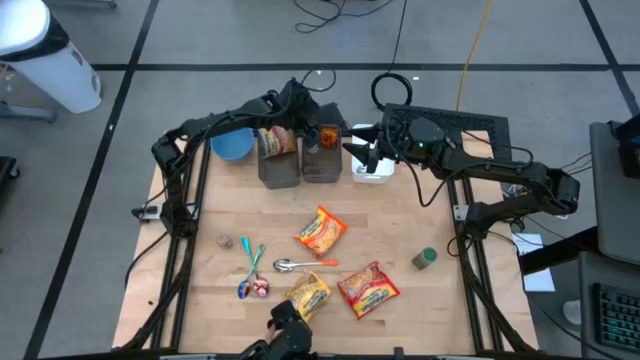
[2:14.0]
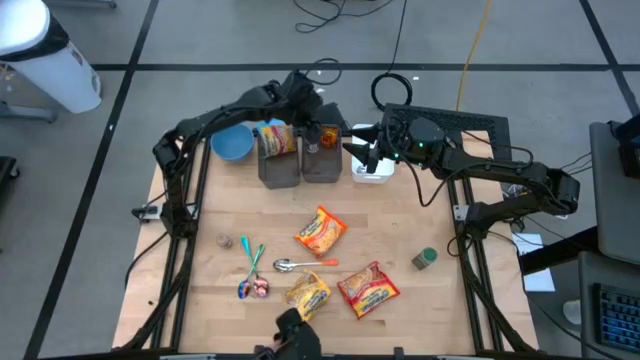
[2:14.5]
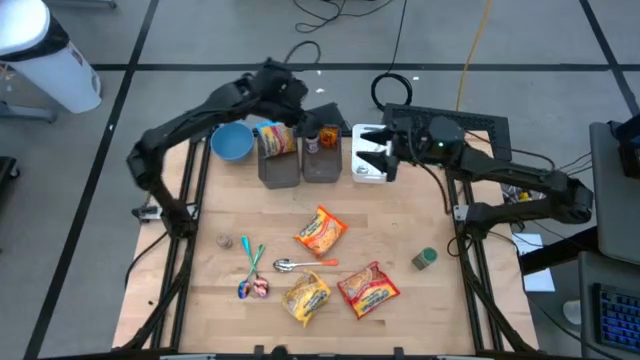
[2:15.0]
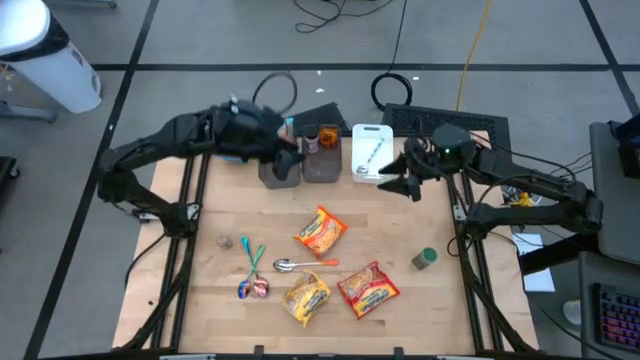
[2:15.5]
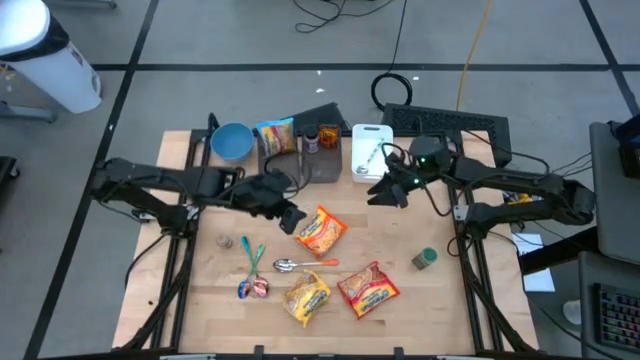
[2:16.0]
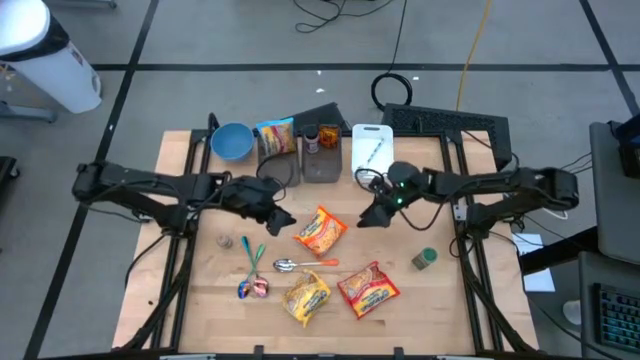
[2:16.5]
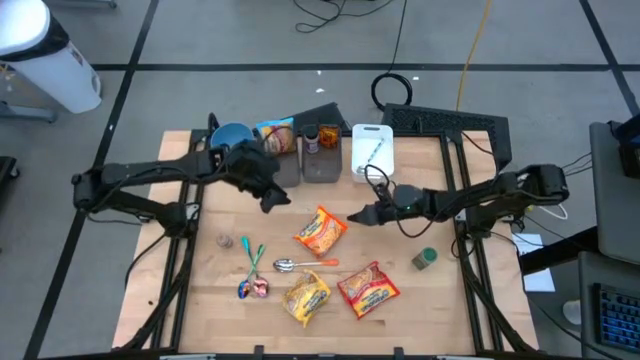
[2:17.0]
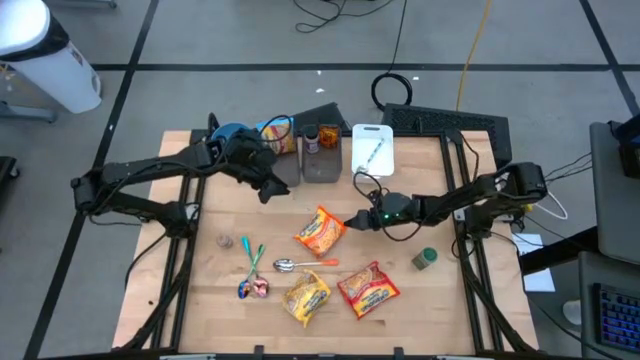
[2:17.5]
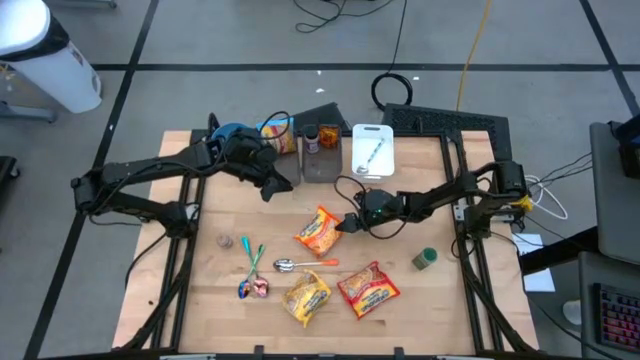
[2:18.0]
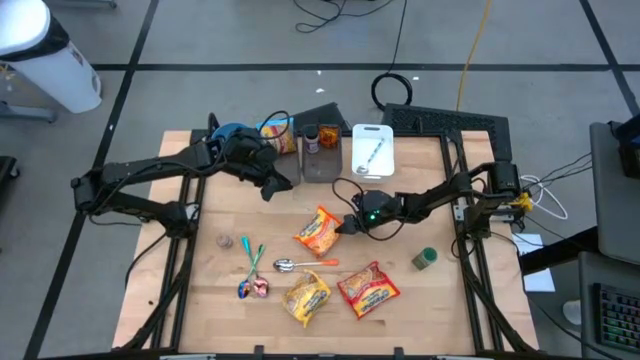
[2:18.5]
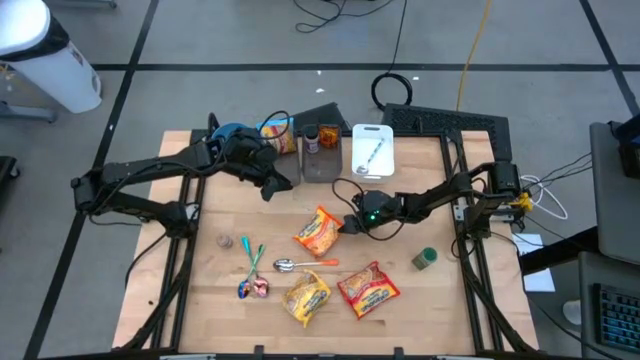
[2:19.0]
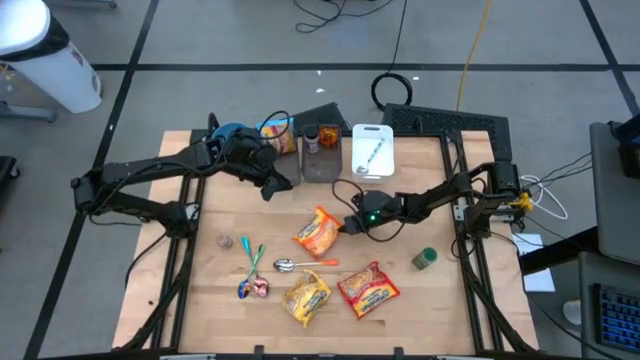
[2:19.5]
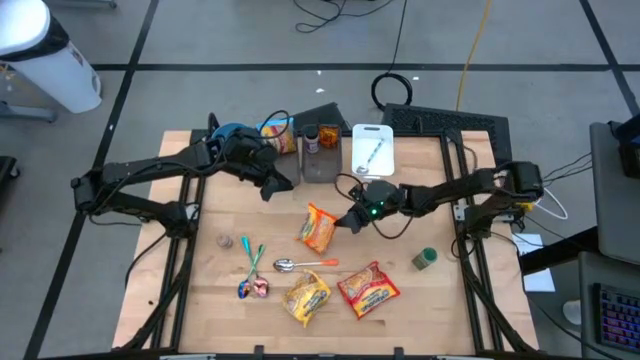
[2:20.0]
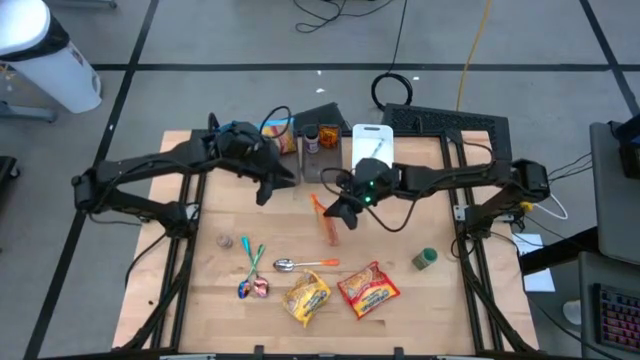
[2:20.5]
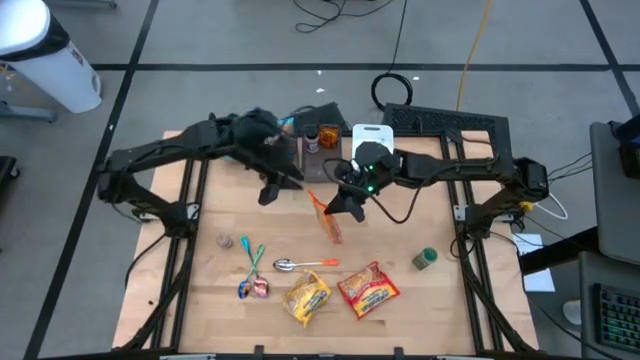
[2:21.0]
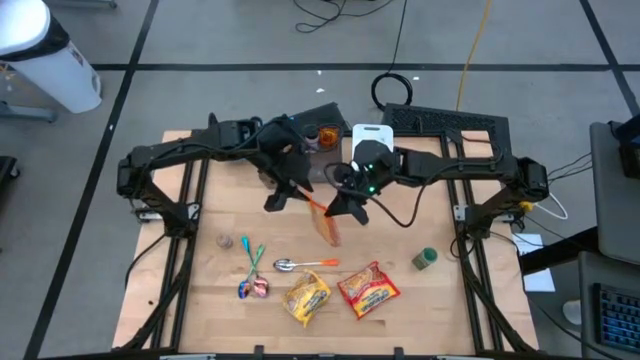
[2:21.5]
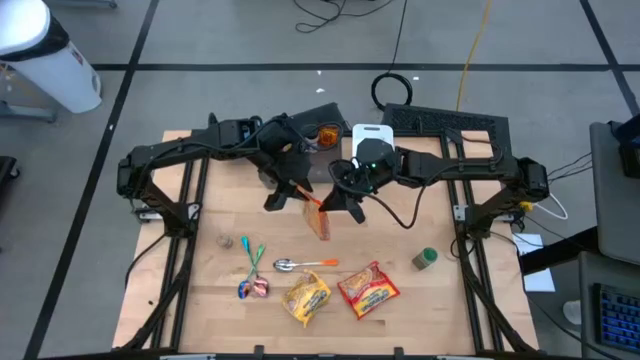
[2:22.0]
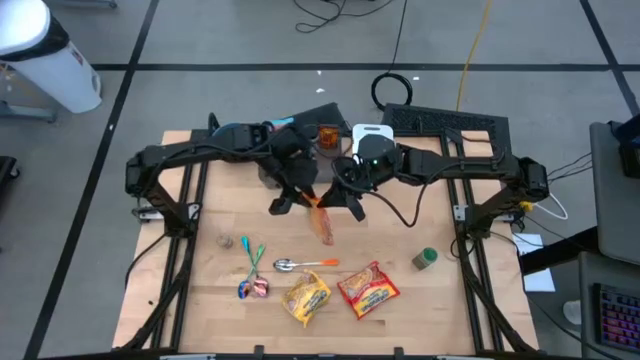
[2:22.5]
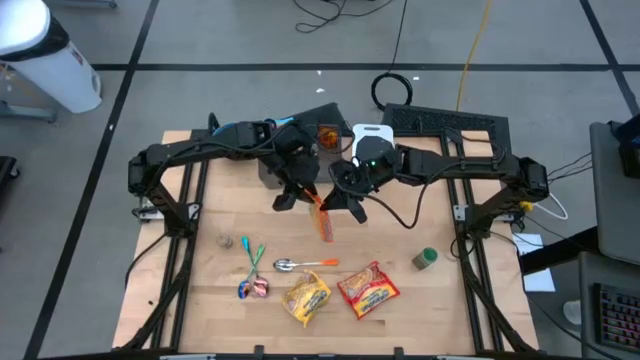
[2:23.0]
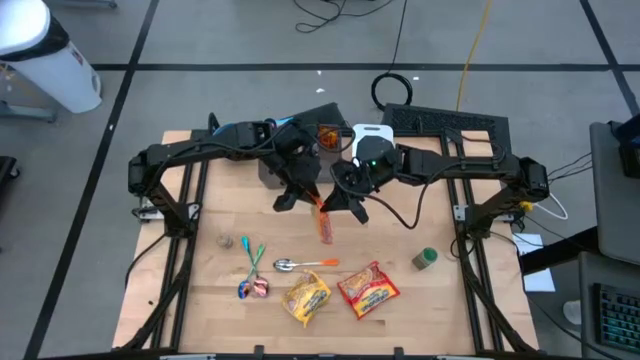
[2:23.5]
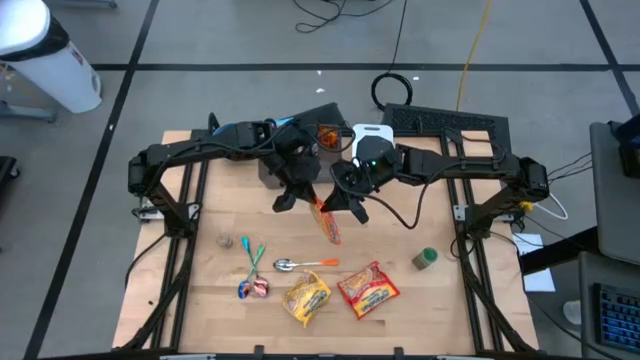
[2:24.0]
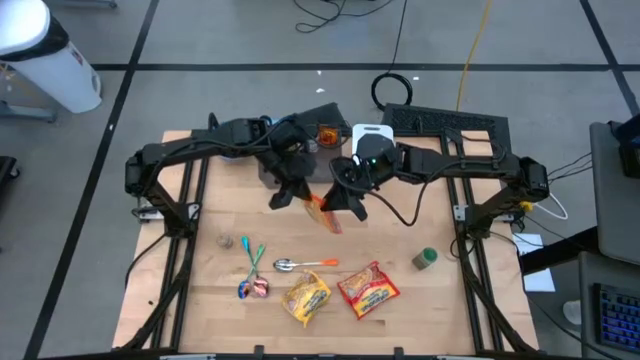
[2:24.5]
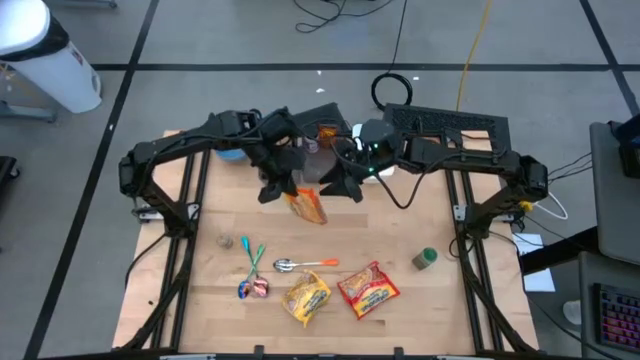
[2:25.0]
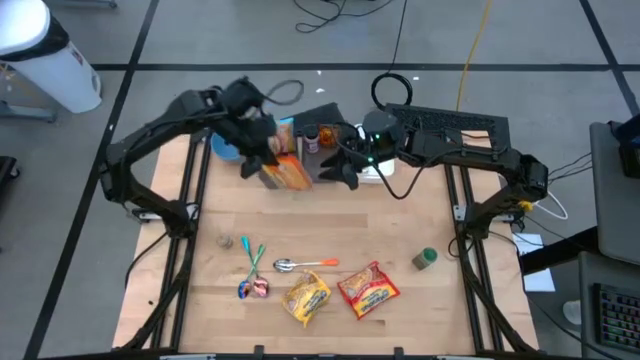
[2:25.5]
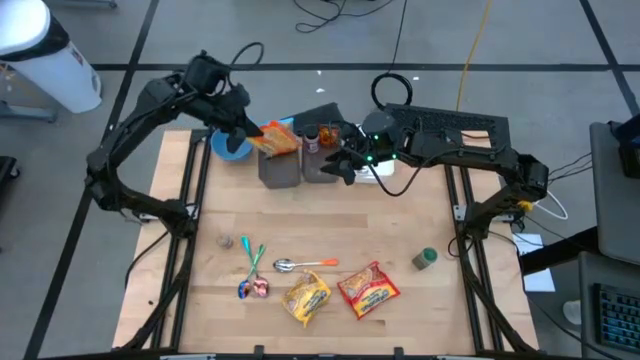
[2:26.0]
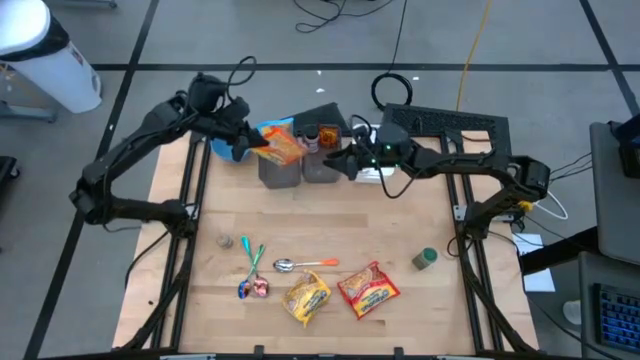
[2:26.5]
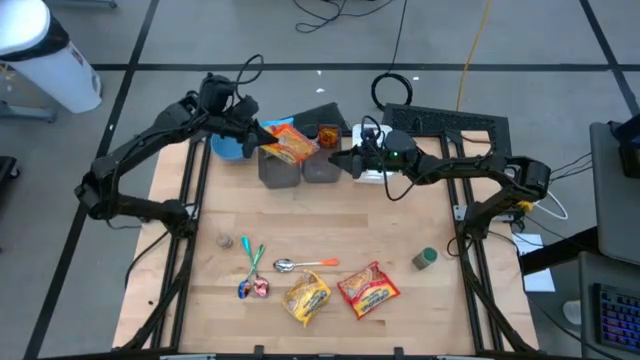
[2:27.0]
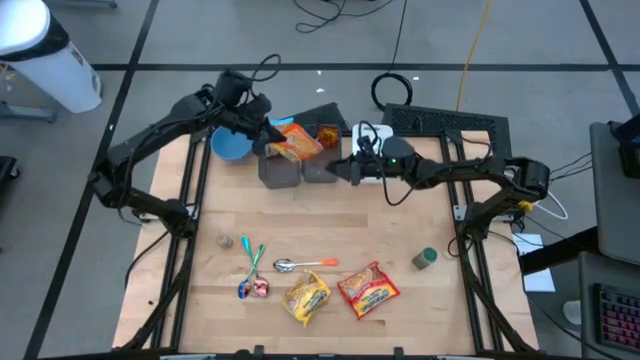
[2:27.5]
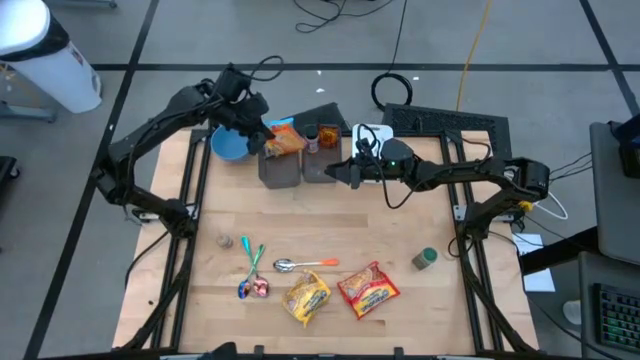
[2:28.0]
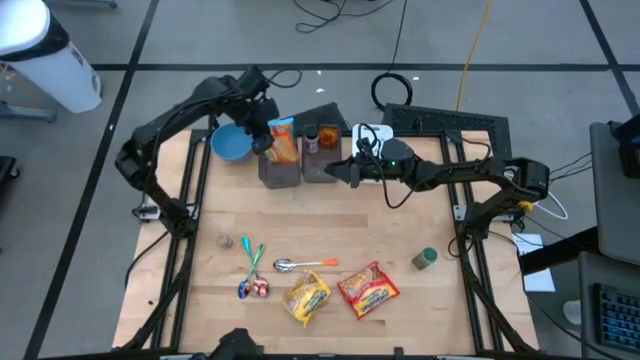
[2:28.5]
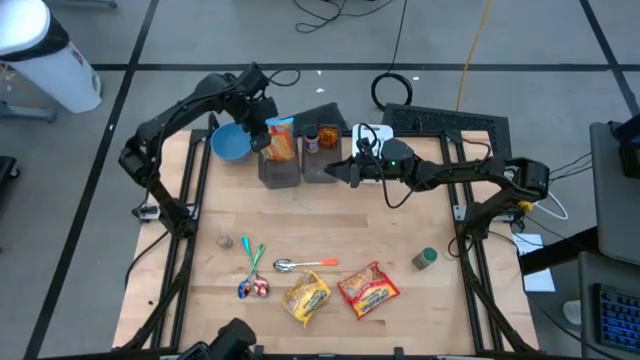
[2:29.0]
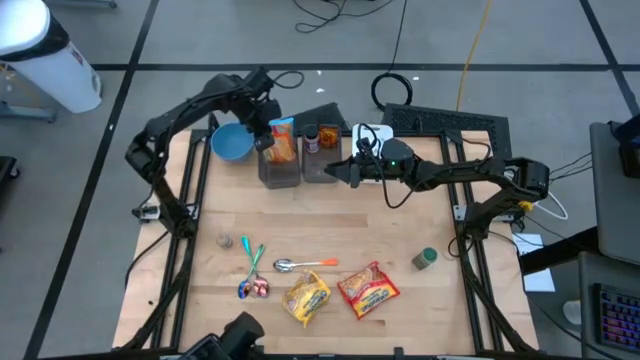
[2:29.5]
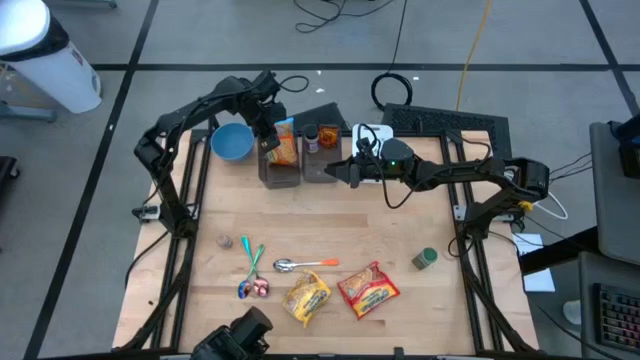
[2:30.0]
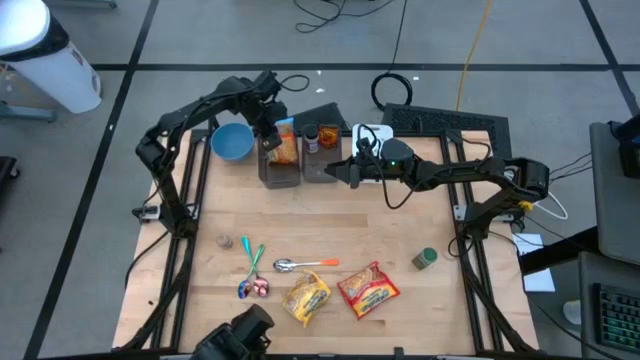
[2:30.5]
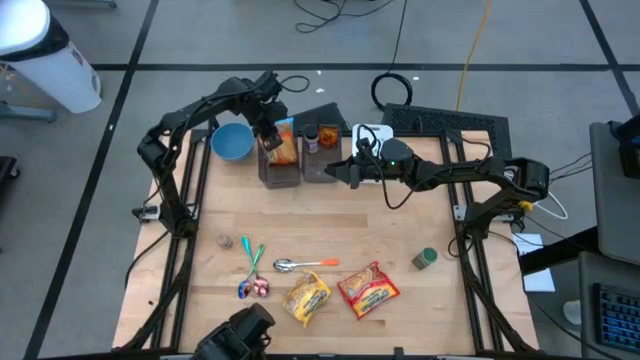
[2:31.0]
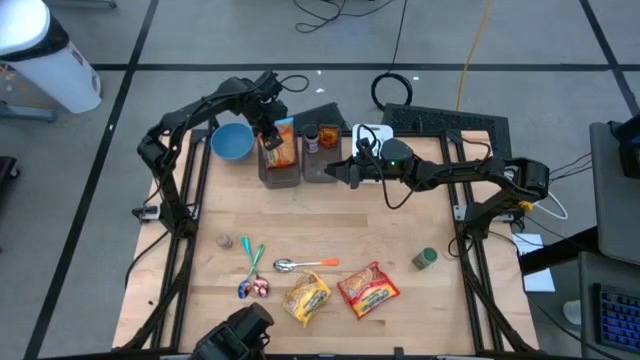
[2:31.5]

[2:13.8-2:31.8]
Task: Pick & Place Food Item
Put the orange noodle pack into the left black bin

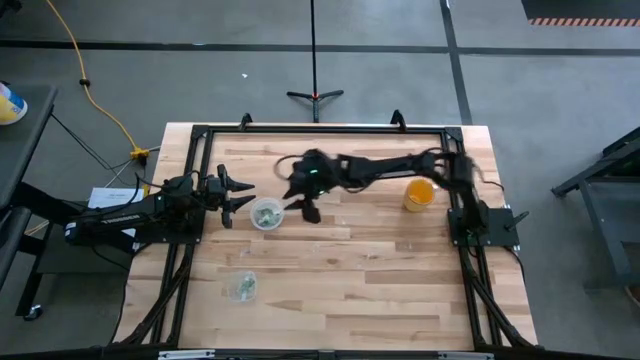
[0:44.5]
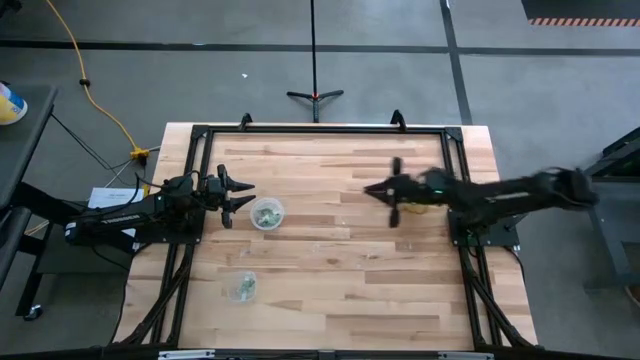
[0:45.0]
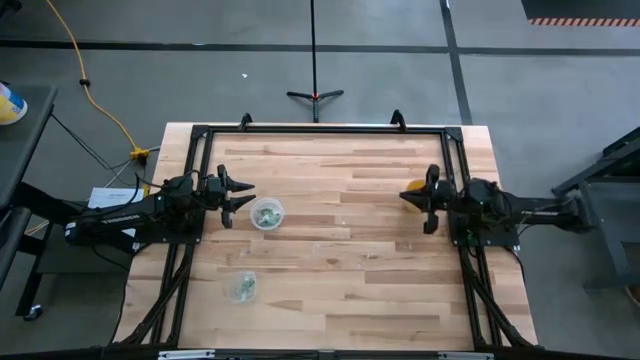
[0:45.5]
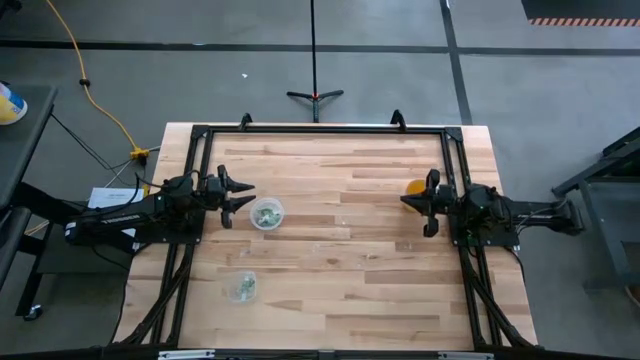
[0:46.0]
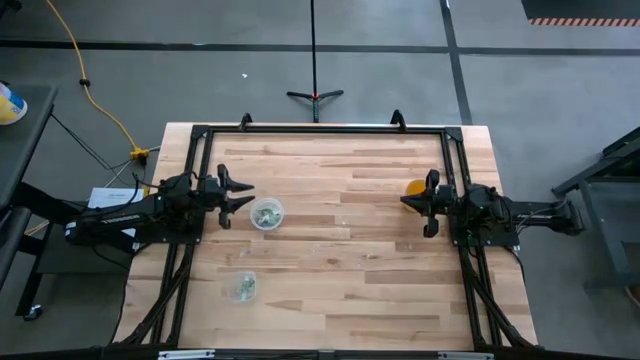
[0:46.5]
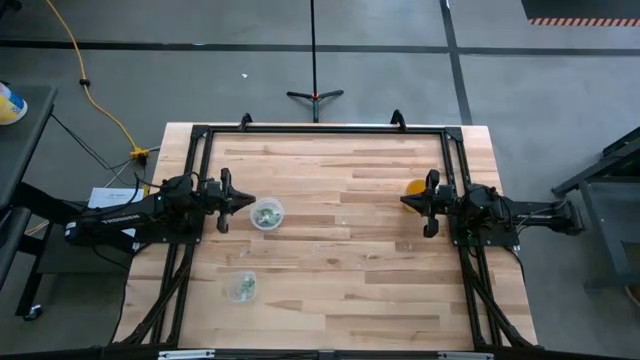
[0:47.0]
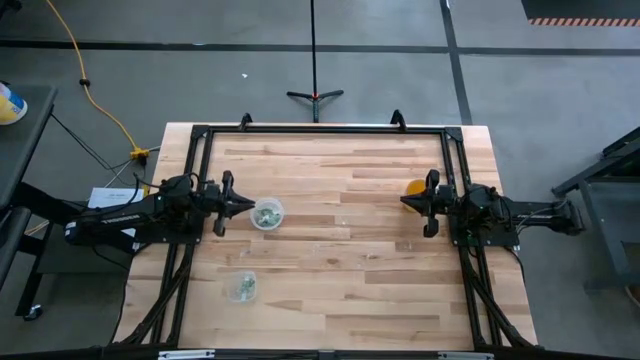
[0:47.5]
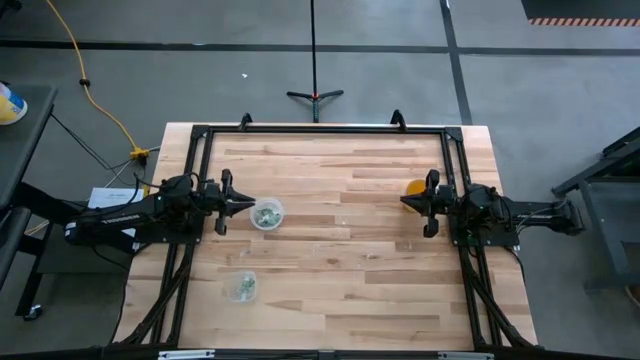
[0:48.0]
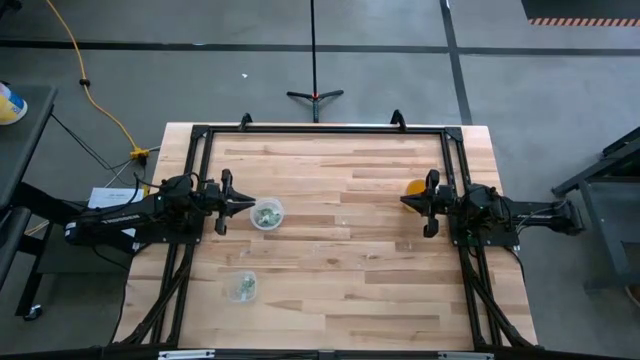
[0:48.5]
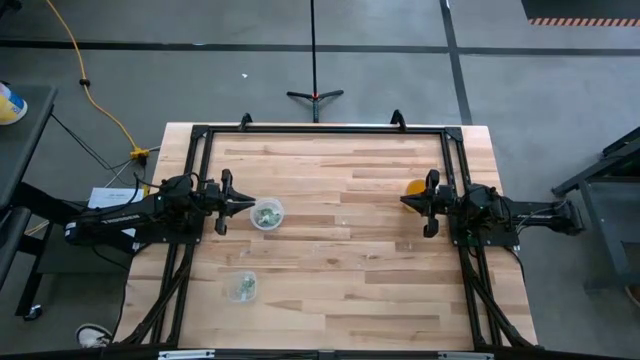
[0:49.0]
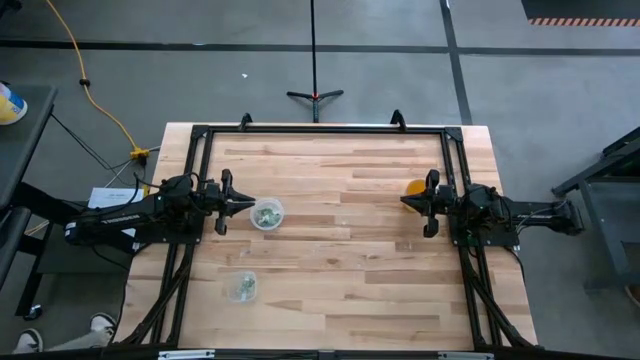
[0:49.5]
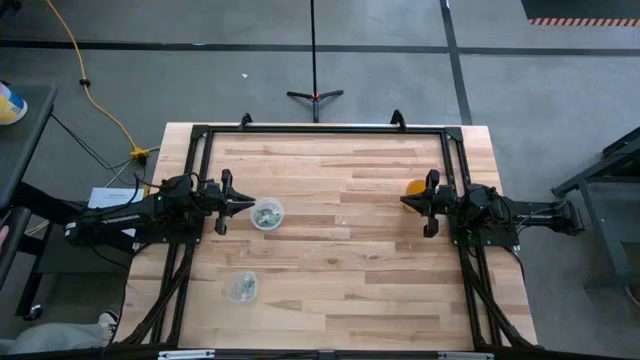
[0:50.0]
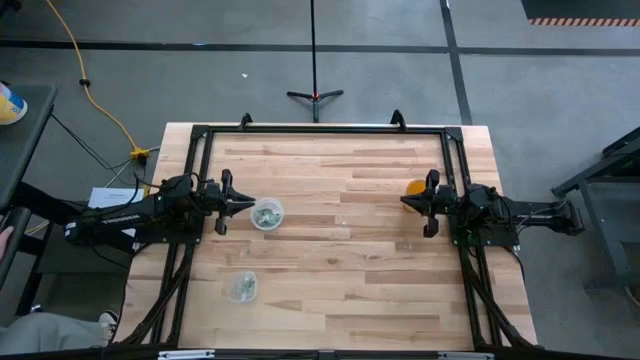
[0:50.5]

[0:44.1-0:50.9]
Task: Pick and place Stevia / Truvia into bins
Return to Home Position
